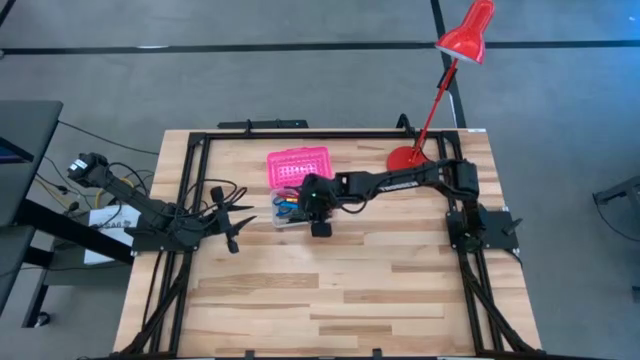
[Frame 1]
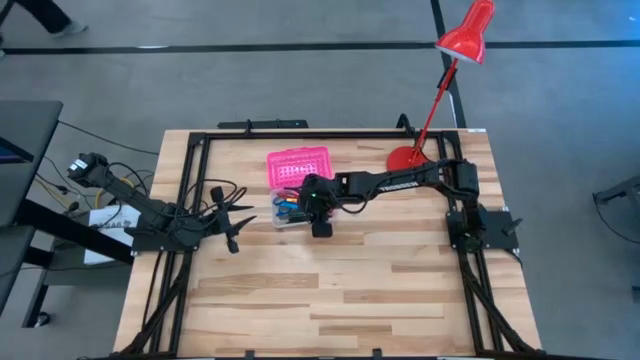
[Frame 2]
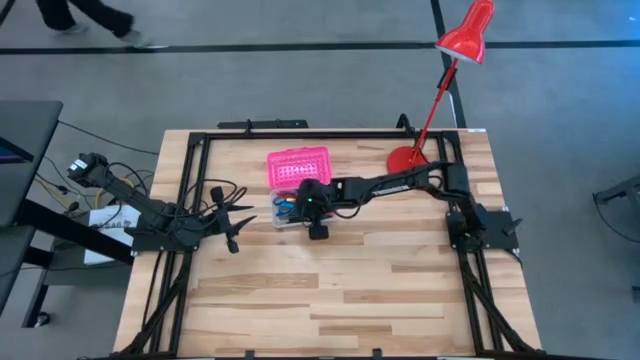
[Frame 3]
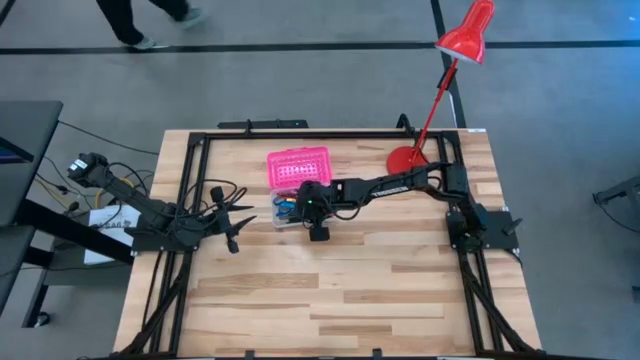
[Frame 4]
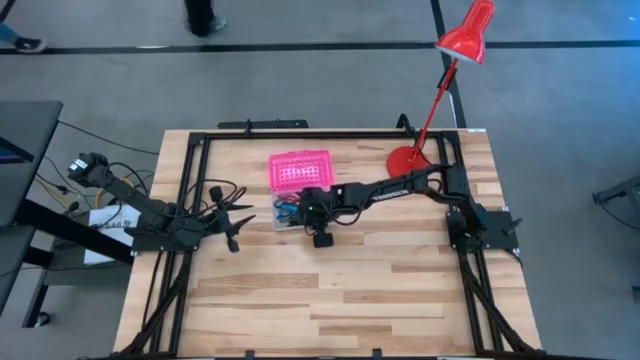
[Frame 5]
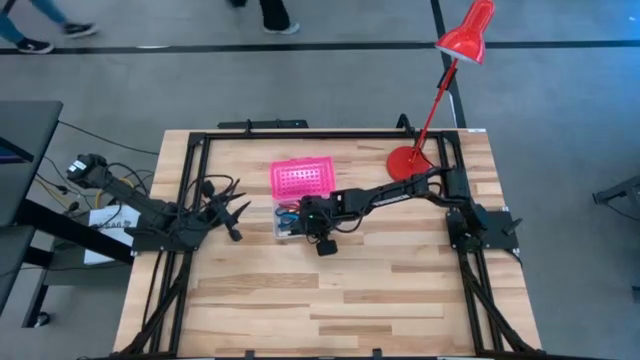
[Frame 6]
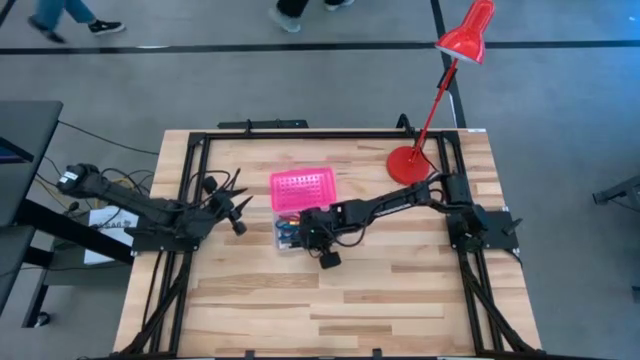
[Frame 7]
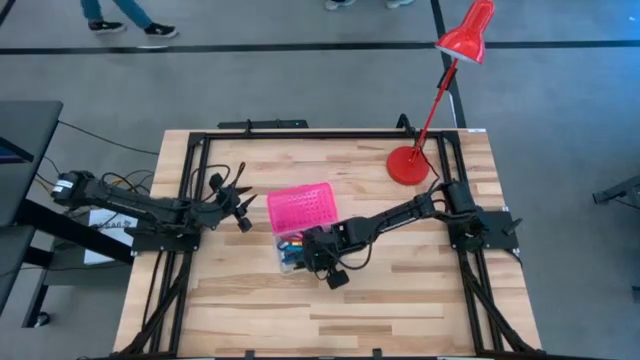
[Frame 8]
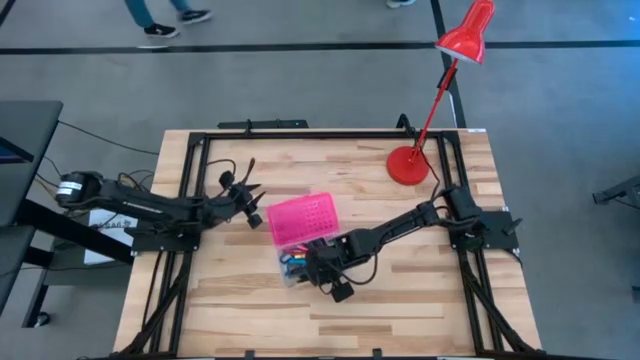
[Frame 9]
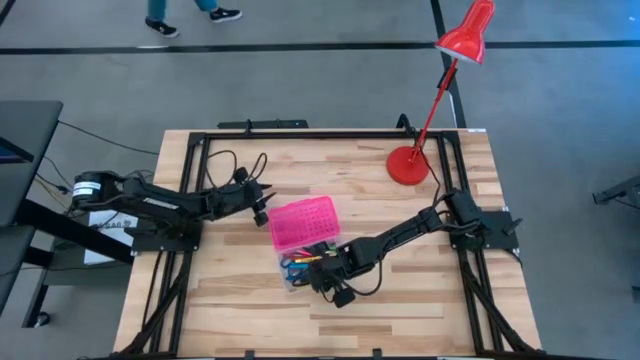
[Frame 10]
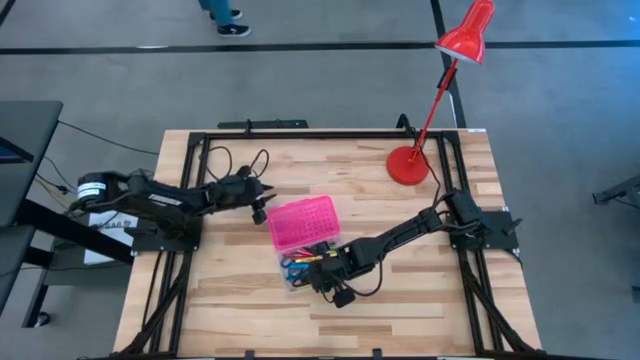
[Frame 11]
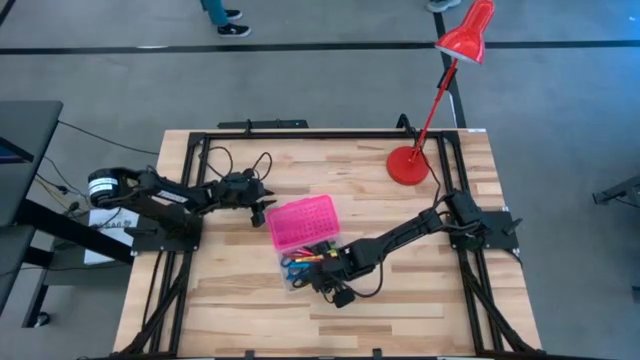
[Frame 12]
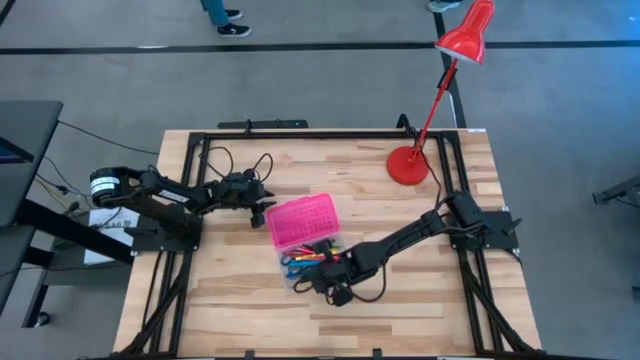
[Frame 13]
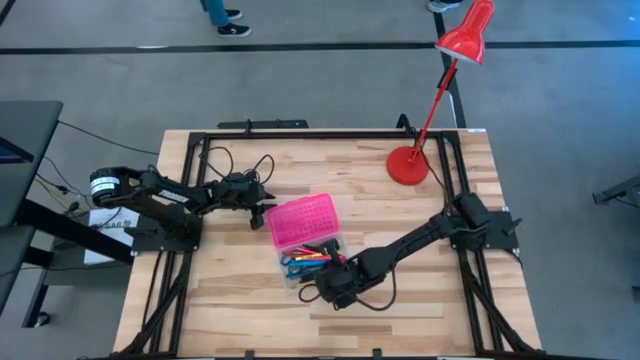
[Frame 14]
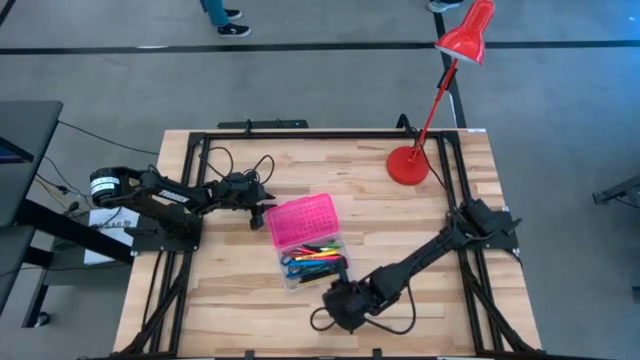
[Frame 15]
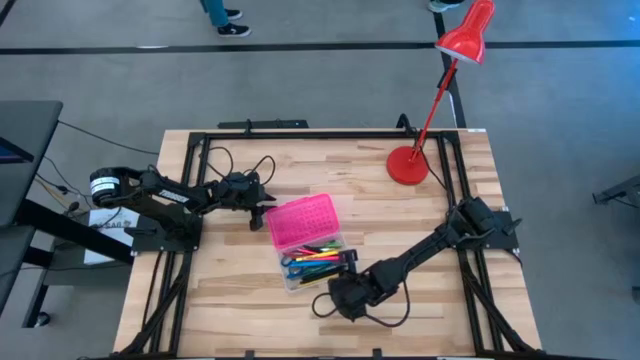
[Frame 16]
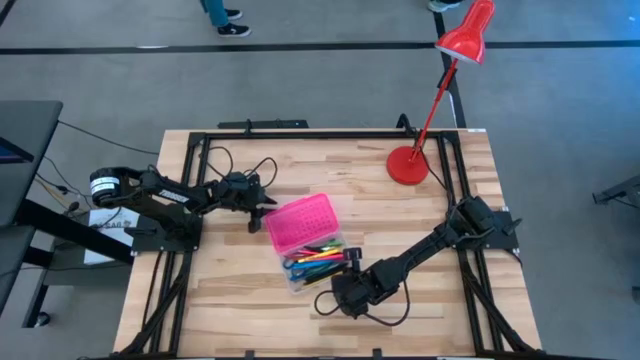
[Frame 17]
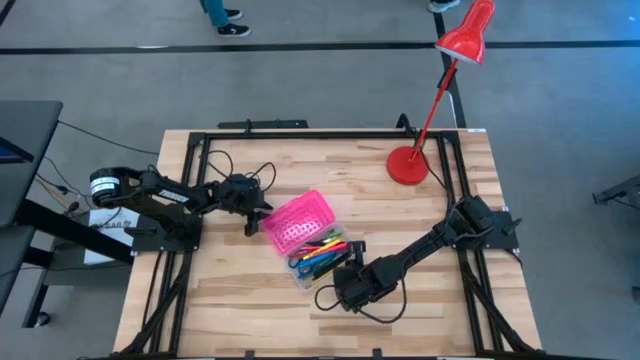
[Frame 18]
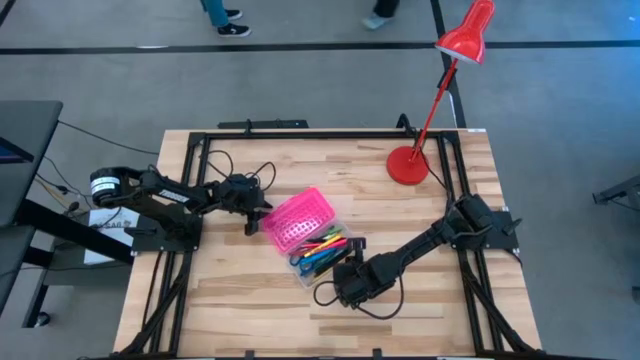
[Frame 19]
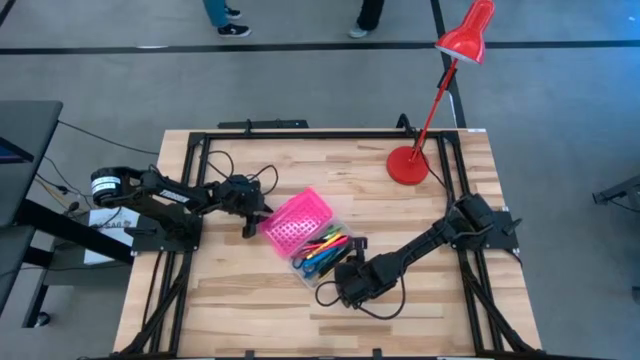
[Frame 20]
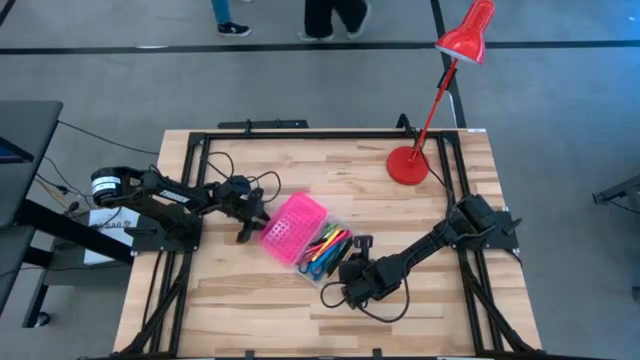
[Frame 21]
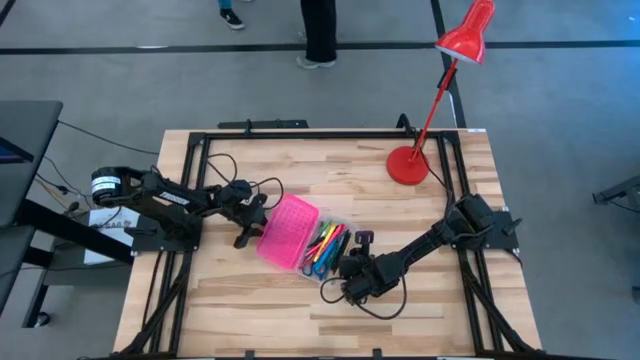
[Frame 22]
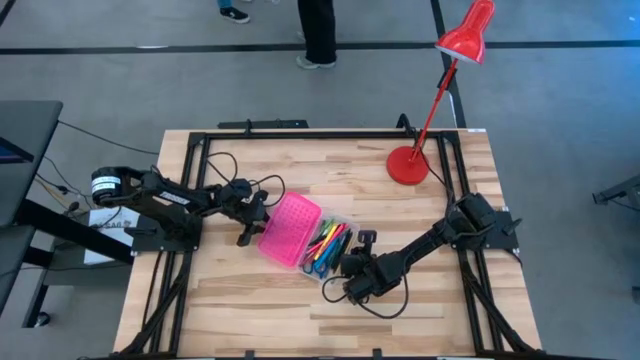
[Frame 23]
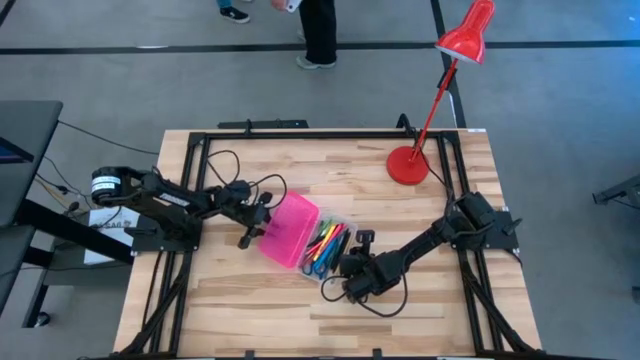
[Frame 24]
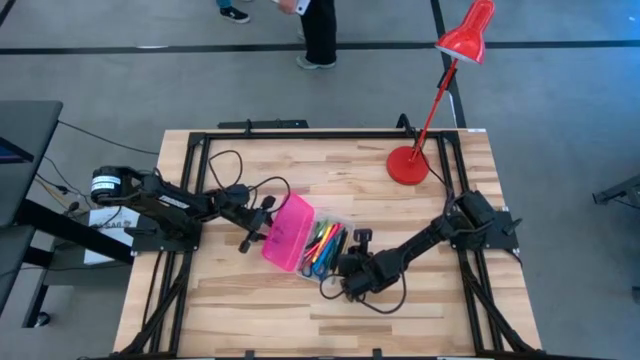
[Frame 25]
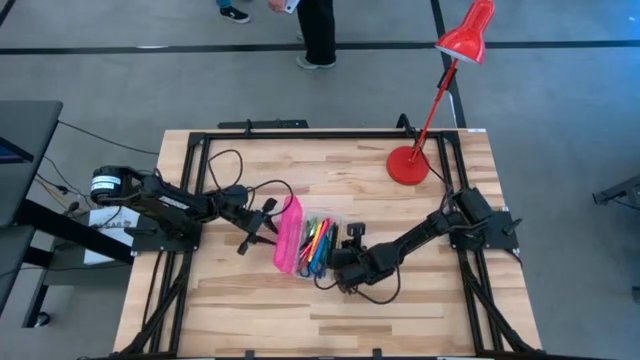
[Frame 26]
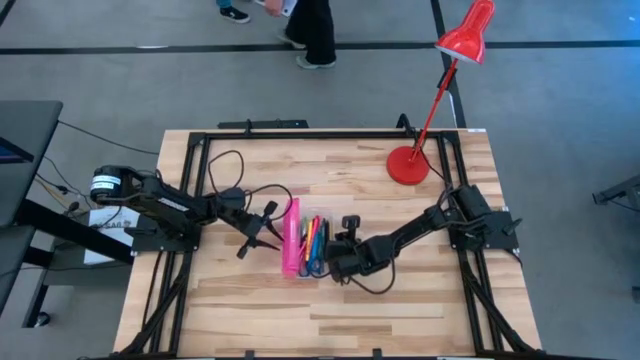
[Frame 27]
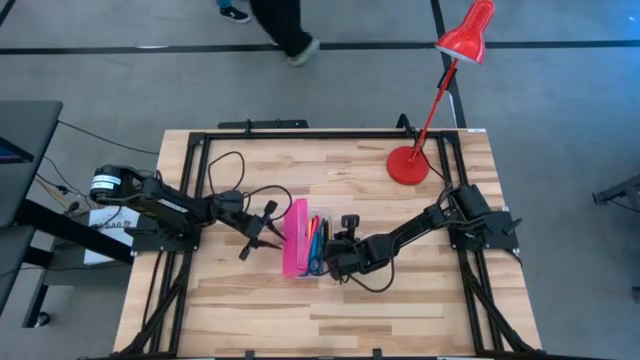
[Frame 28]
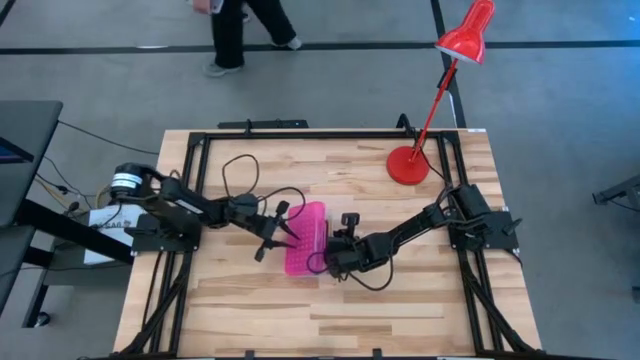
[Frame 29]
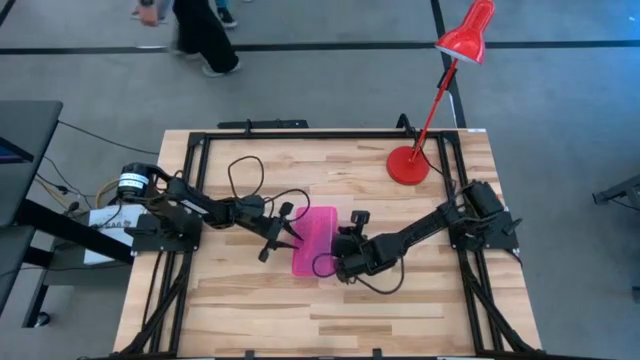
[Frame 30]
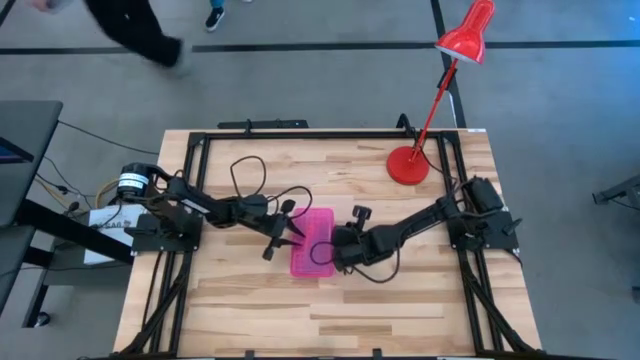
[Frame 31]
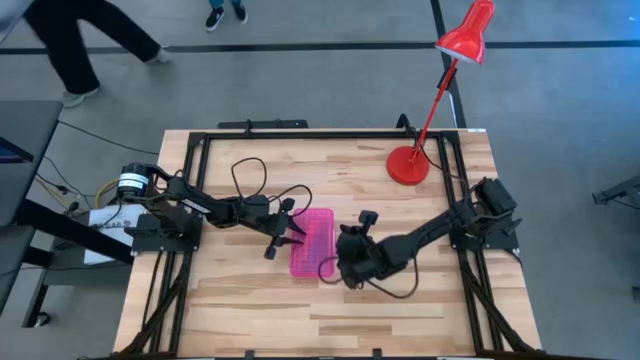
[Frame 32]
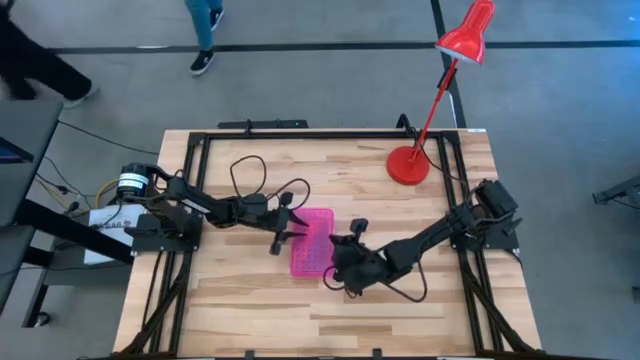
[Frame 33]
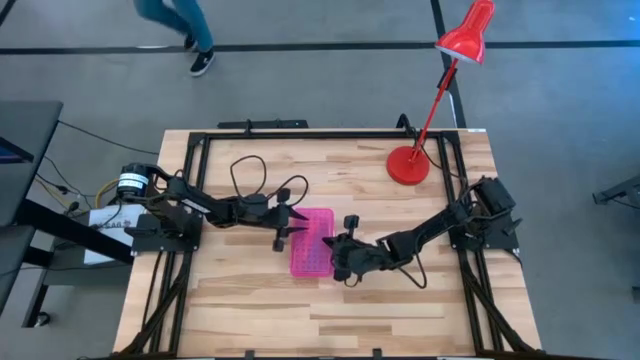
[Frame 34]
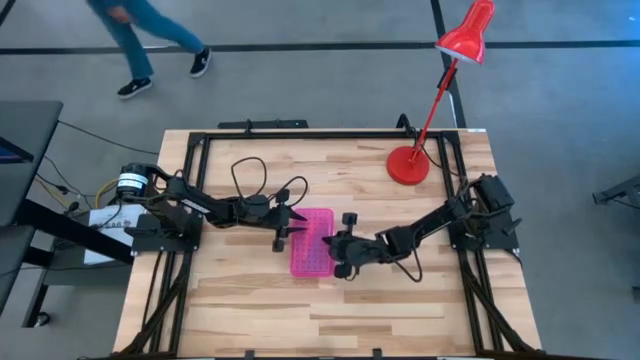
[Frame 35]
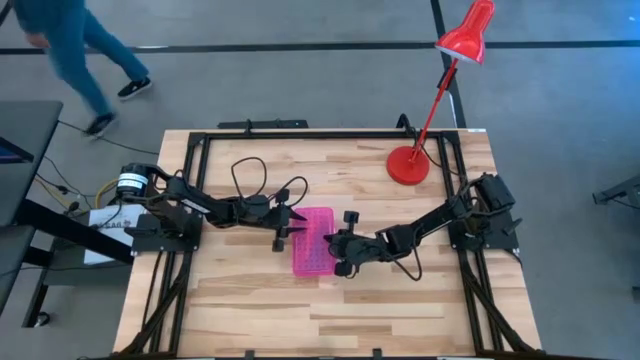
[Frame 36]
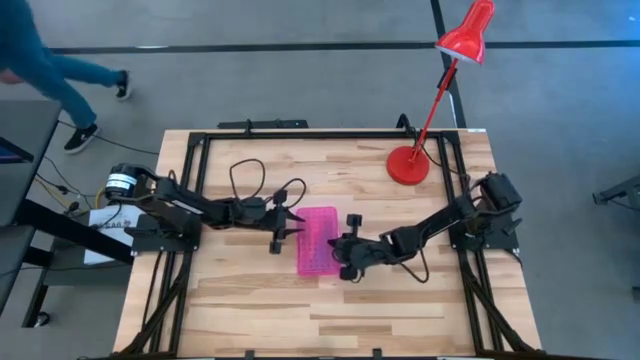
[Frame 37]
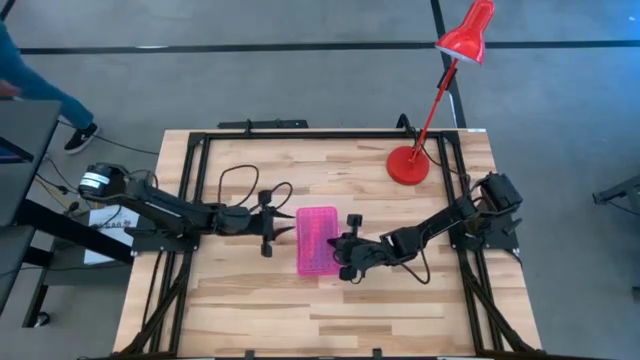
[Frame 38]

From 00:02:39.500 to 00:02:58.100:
Task: Pick & place school supplies into a supply box
Close the pink supply box
